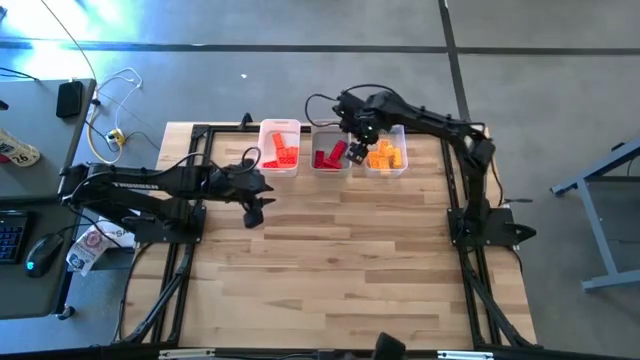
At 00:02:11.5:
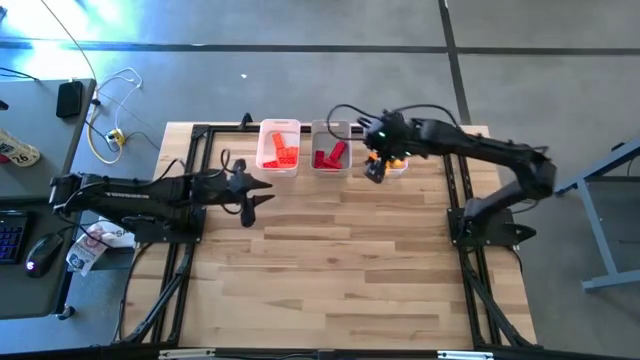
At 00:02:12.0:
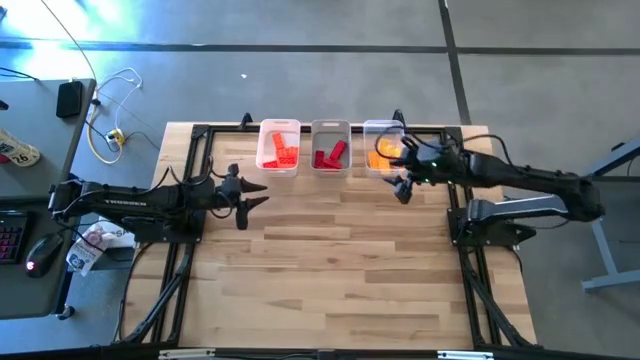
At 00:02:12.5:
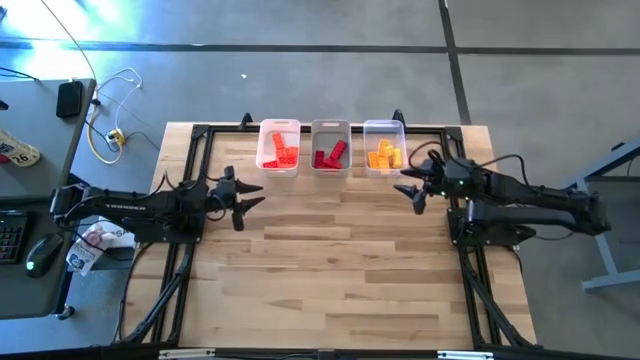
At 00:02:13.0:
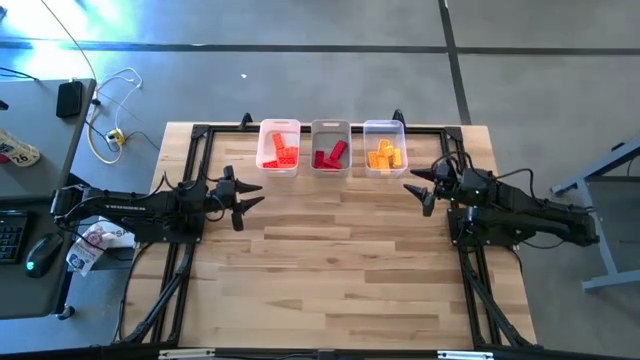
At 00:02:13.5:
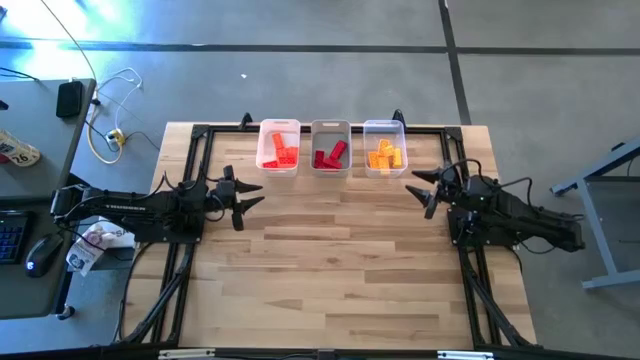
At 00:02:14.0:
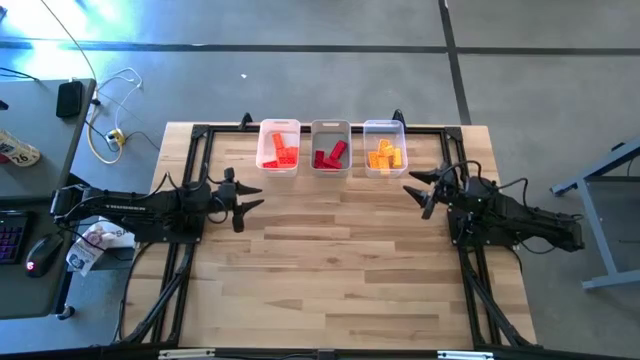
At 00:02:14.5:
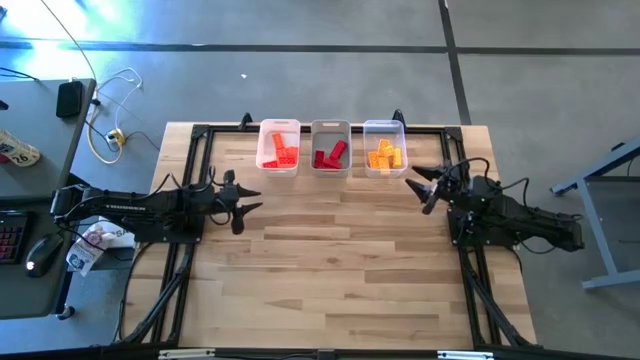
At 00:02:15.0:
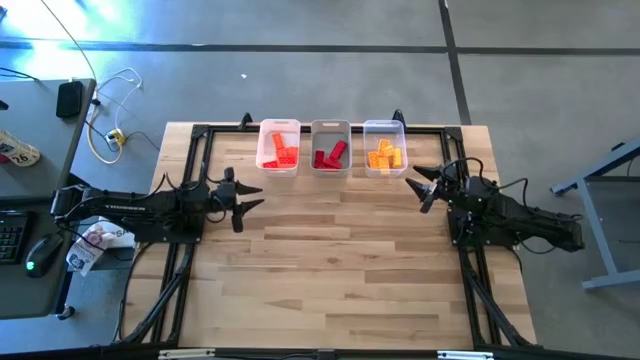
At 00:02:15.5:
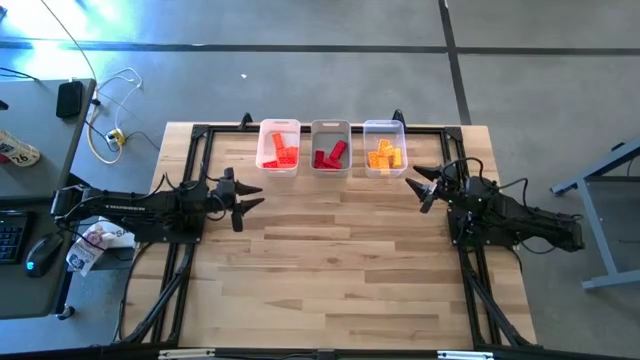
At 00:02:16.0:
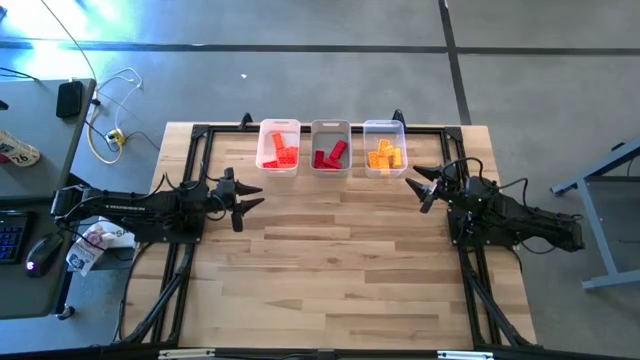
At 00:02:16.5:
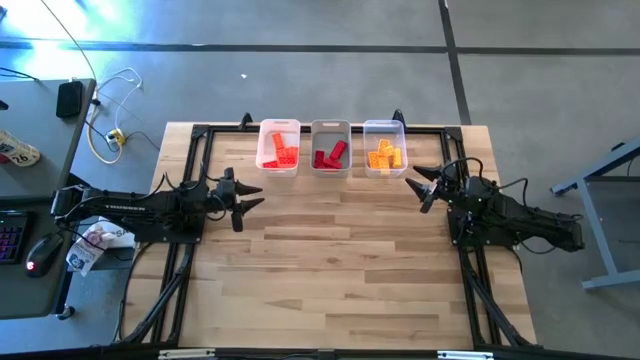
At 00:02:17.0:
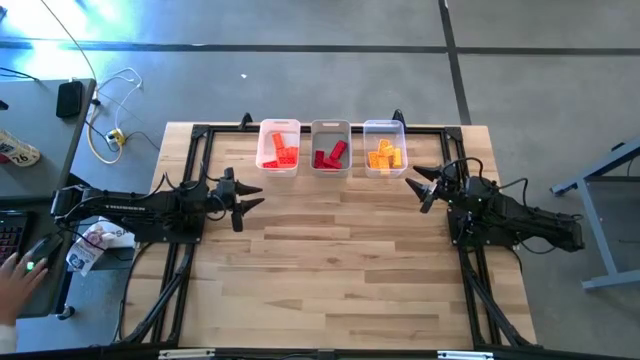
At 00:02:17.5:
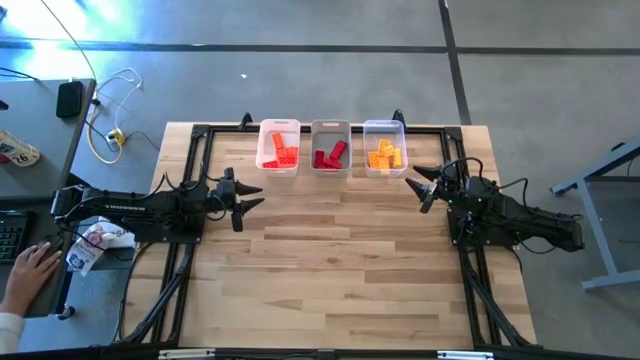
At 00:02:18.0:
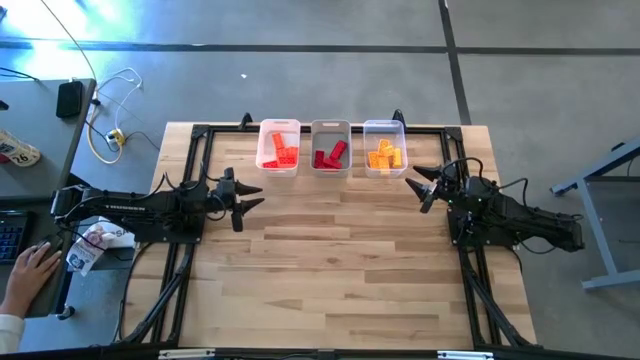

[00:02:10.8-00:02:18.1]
Task: Sort & place blocks by color
Return to Home Position

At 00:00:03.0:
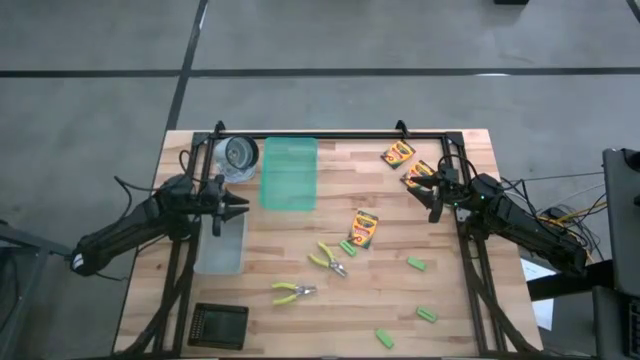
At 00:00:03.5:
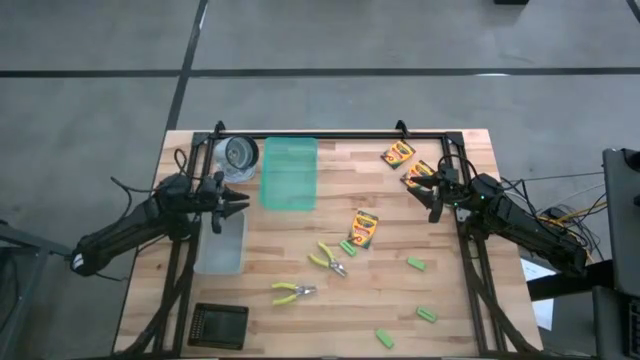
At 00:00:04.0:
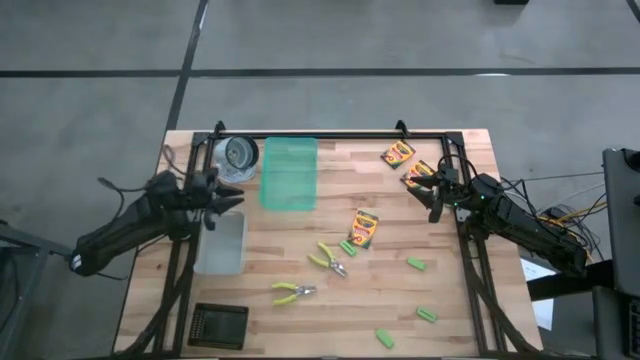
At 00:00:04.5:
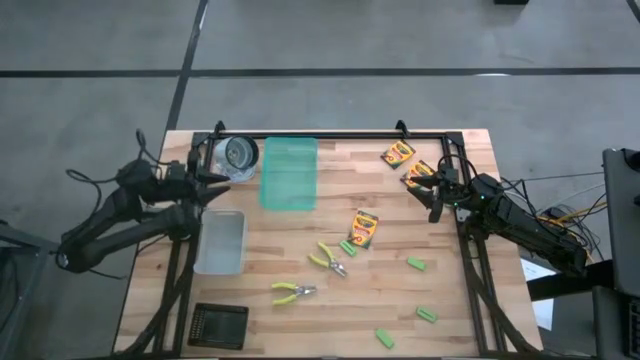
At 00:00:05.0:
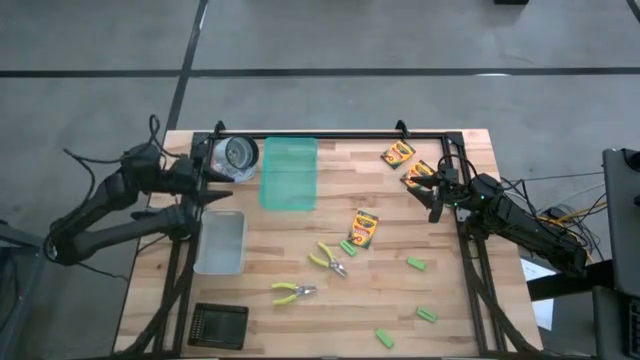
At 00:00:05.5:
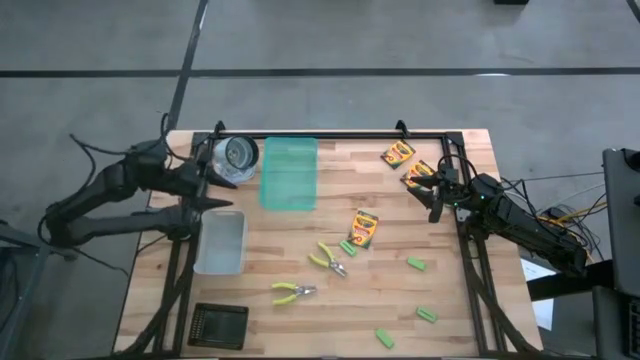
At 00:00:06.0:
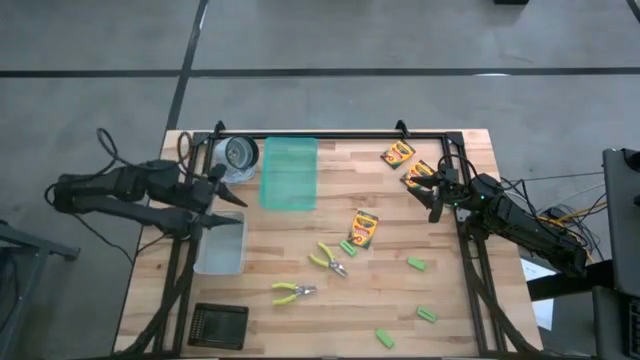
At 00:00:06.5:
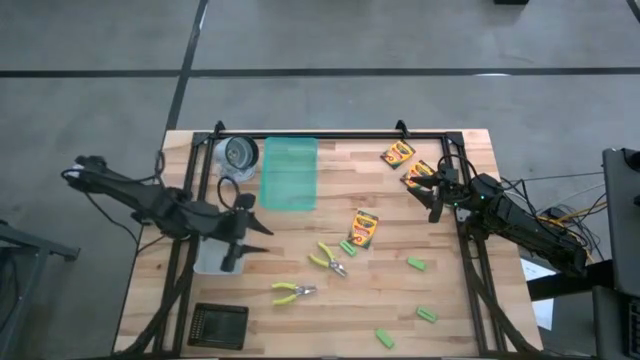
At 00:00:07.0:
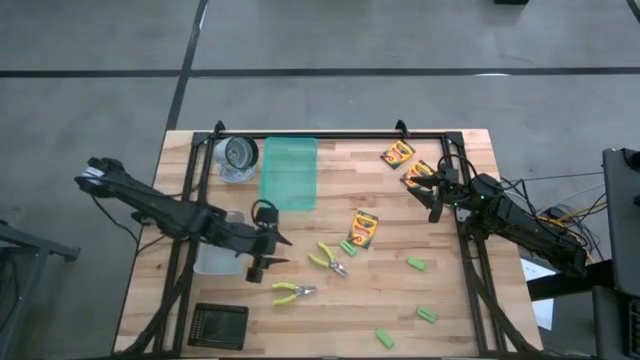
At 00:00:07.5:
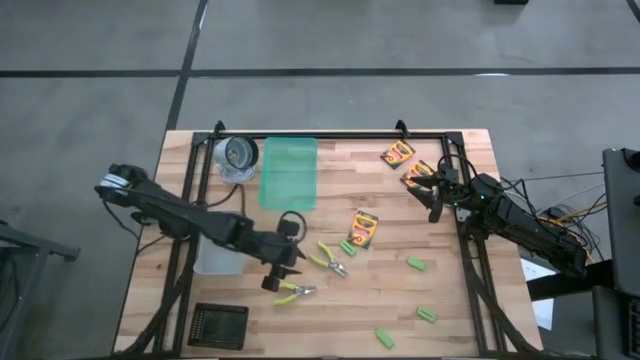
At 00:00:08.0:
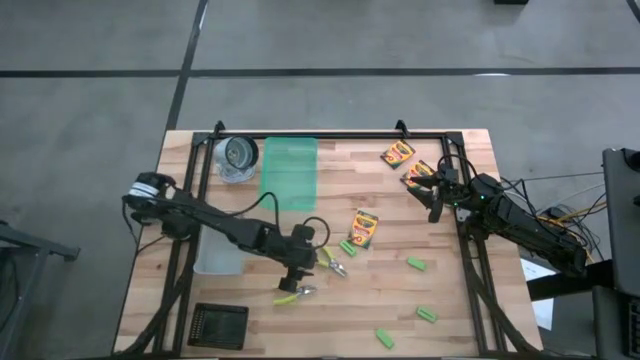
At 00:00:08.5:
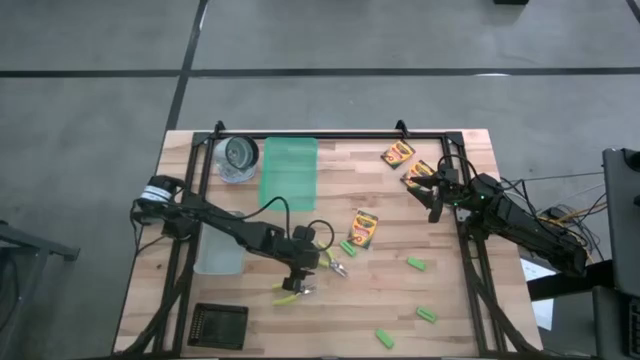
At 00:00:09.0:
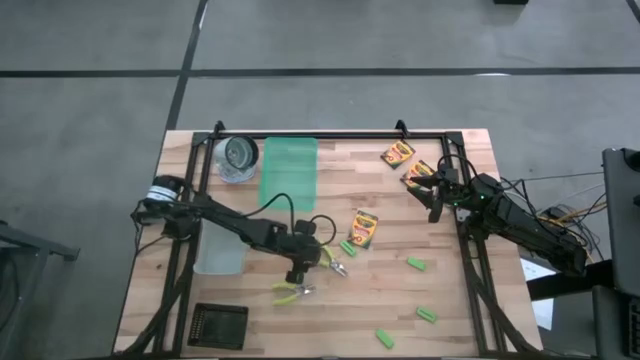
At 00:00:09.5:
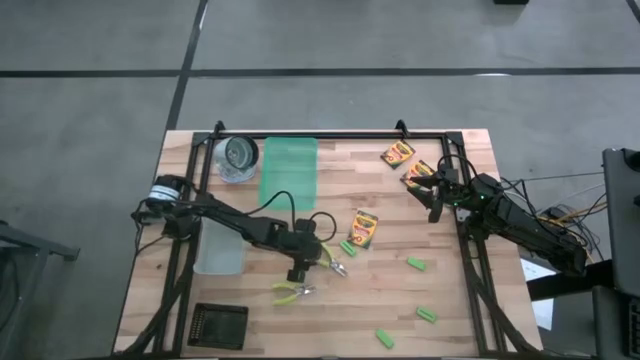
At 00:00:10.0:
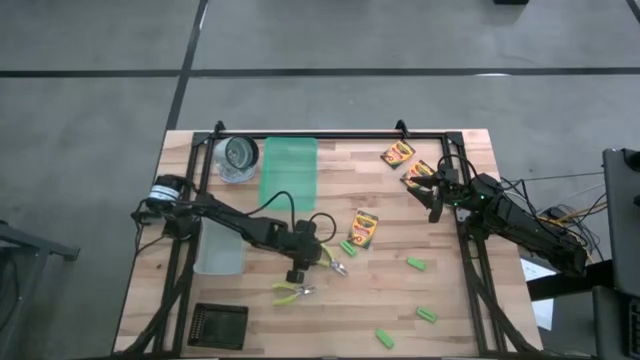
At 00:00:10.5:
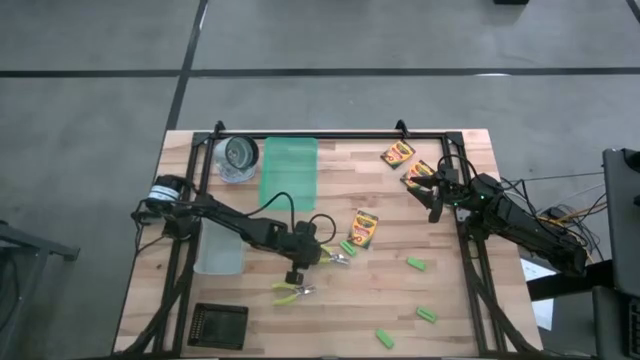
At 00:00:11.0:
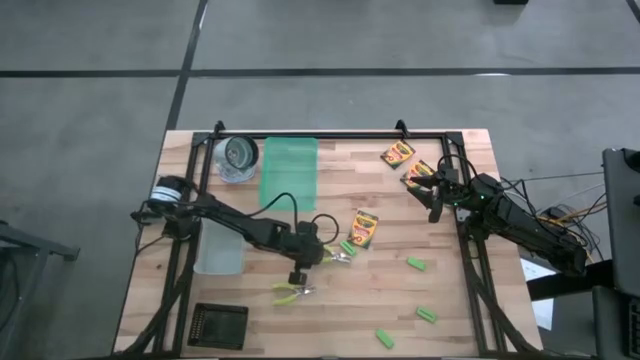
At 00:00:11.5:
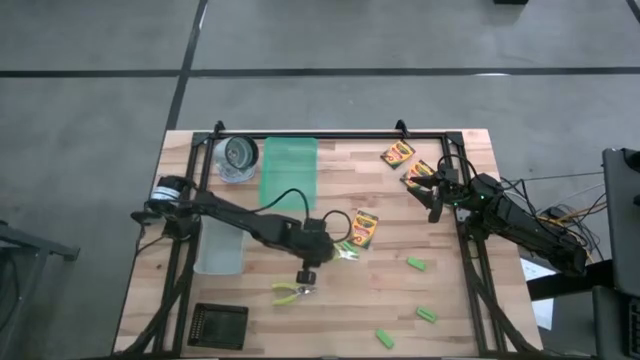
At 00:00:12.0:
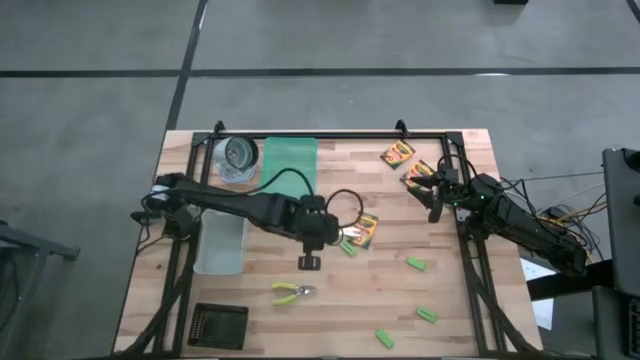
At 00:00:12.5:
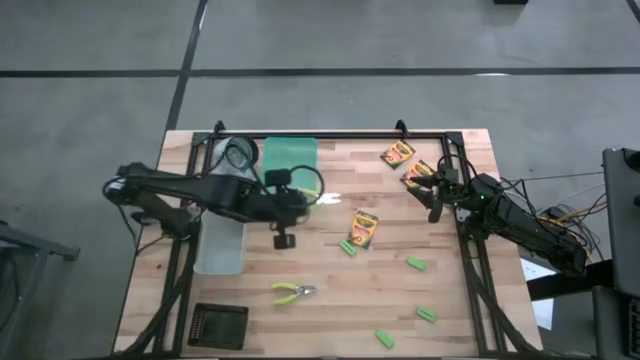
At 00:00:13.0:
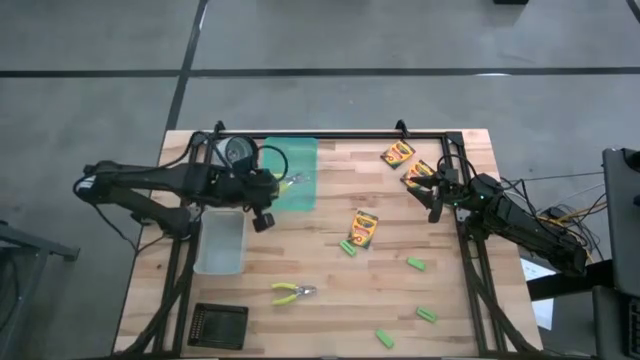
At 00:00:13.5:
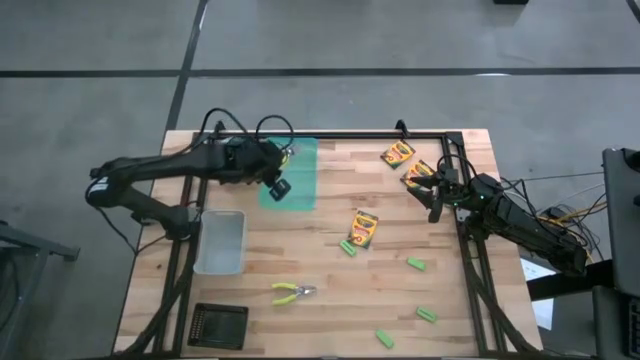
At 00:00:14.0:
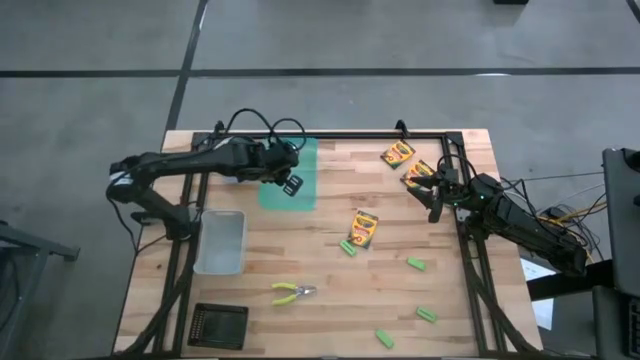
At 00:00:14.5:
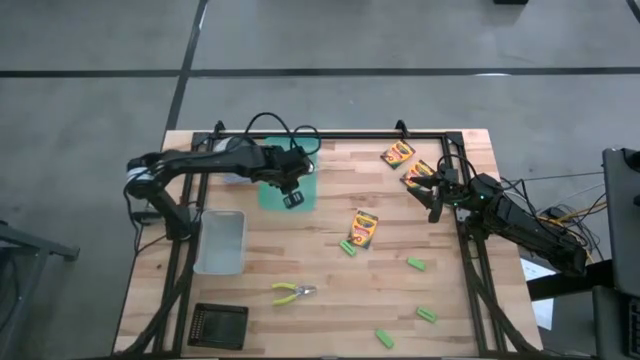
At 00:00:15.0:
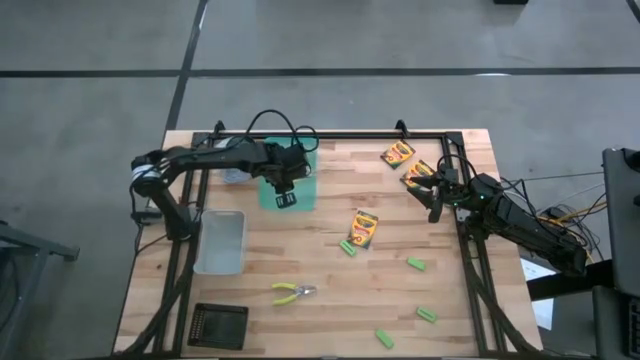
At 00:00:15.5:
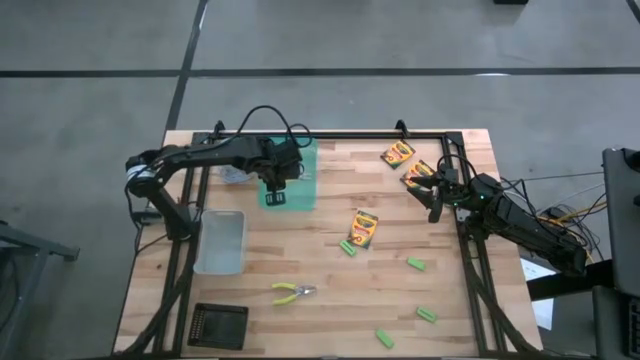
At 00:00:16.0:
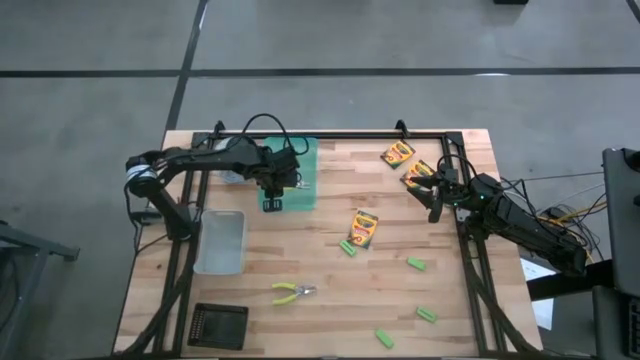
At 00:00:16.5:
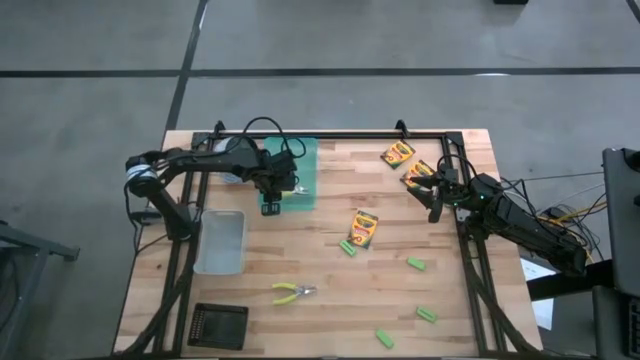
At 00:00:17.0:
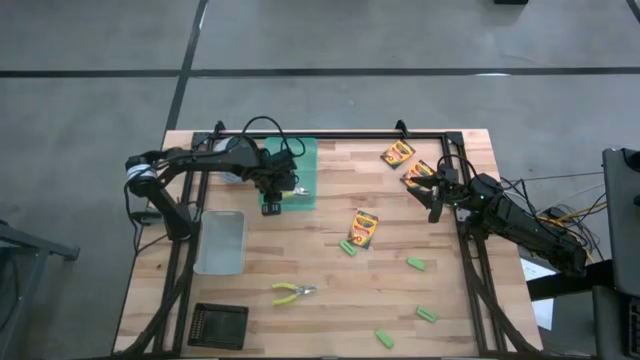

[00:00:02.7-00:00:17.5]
Task: Pick & Place School Supplies
Put the green punch plier into the green bin
